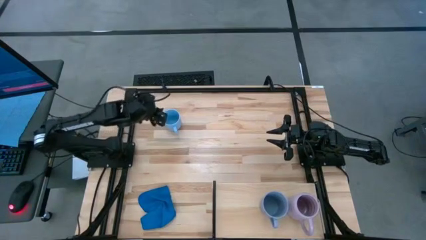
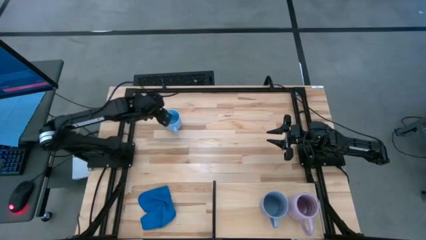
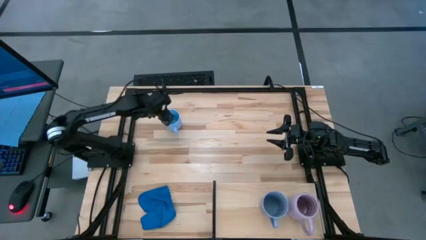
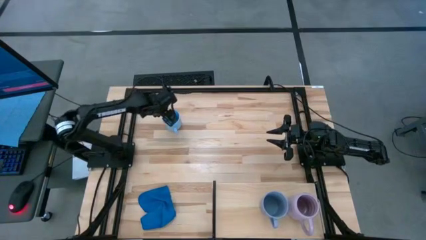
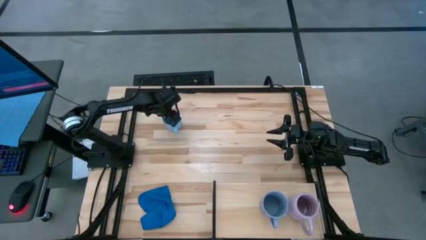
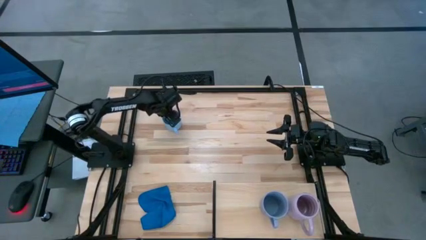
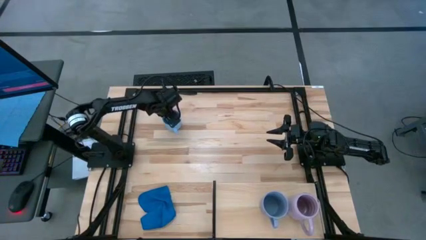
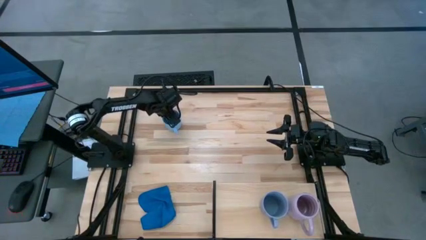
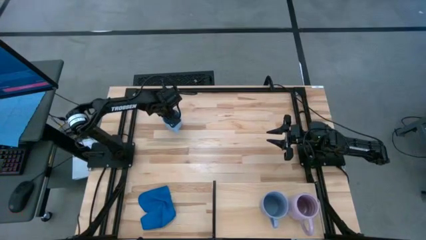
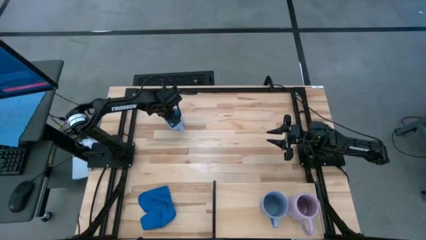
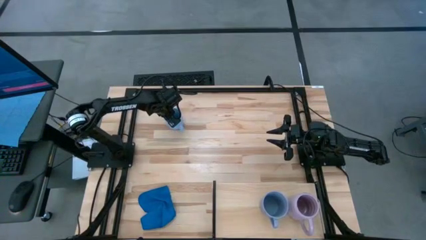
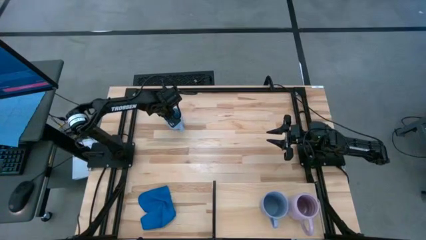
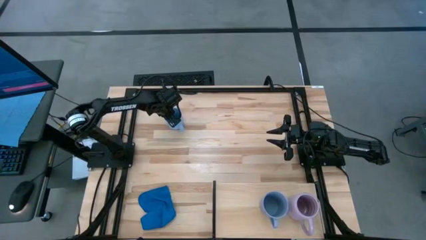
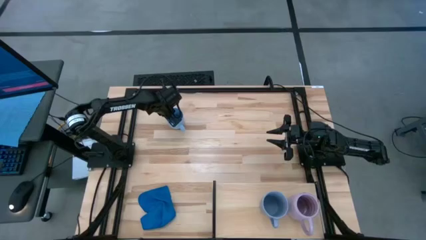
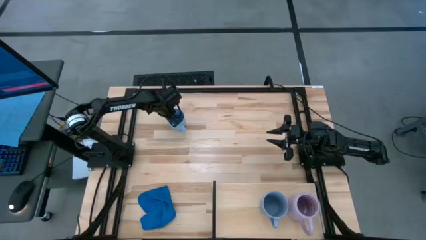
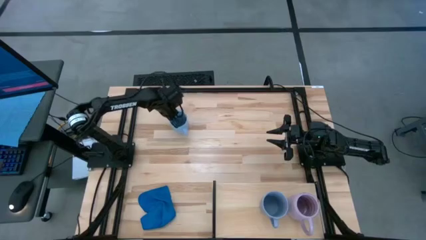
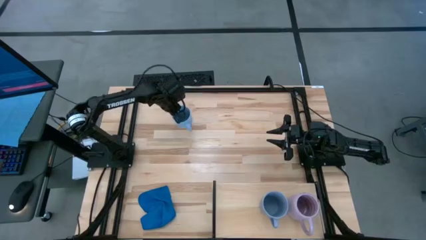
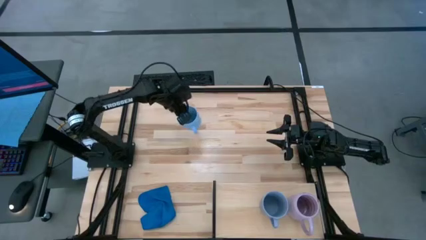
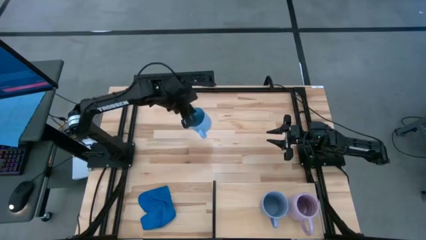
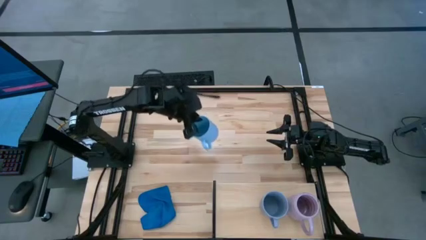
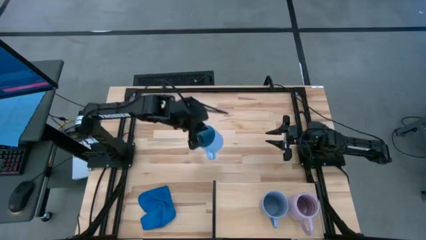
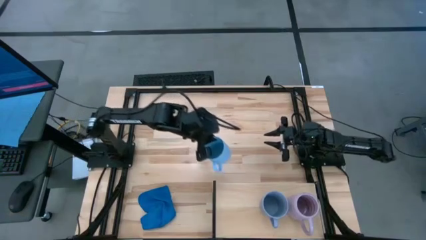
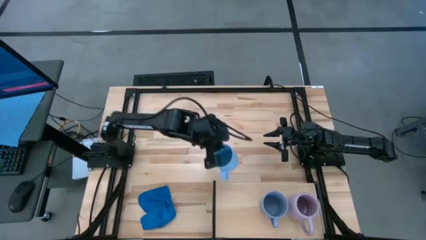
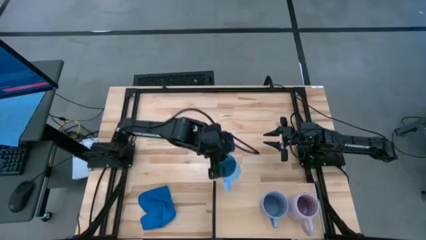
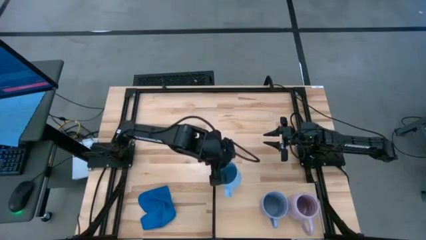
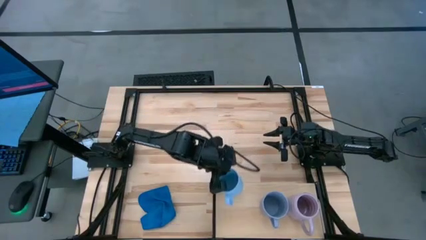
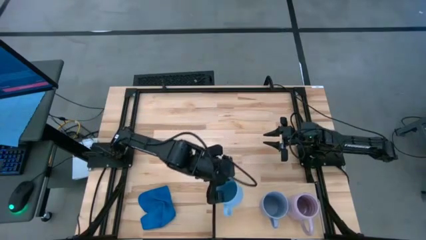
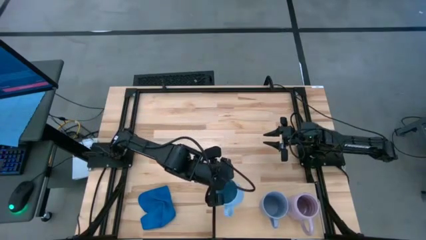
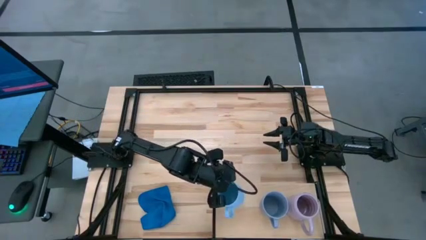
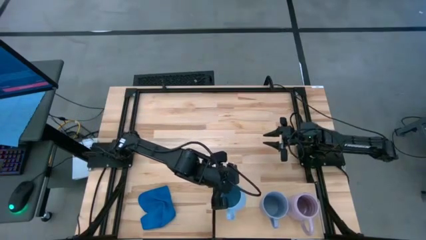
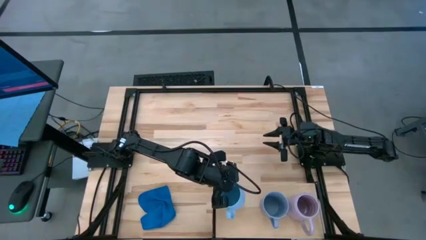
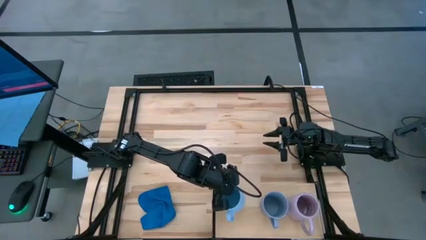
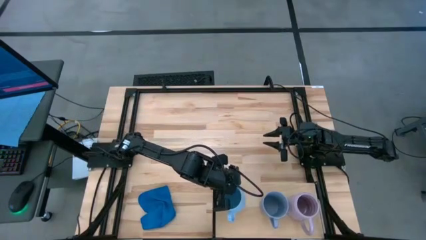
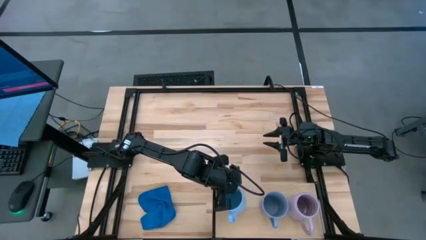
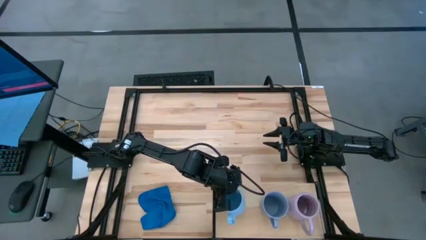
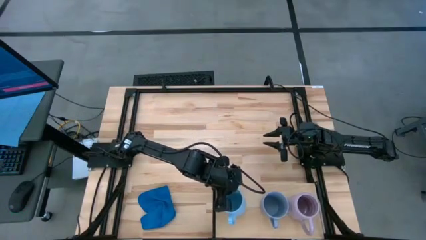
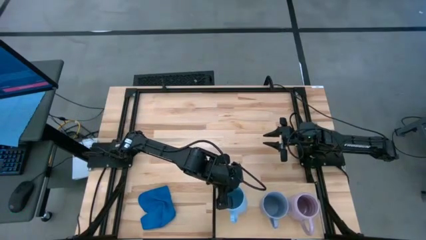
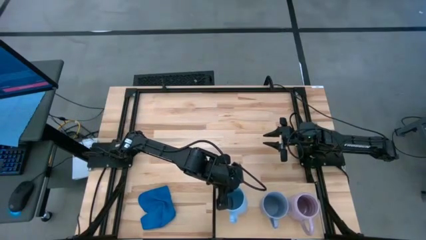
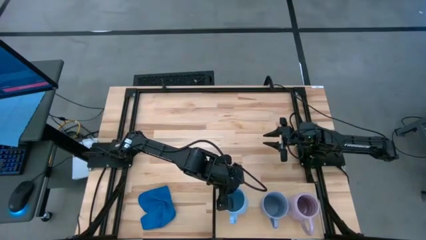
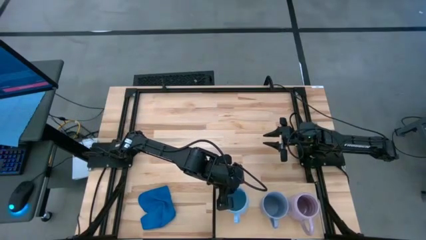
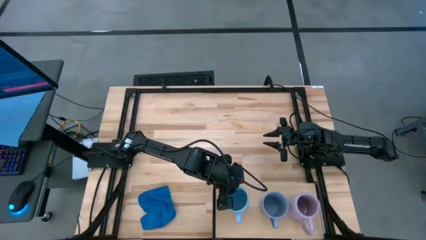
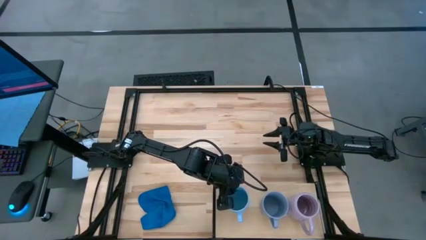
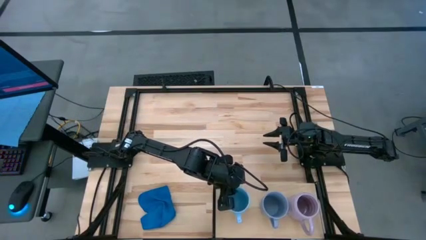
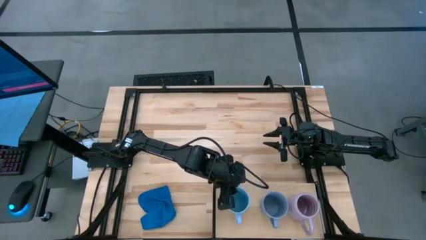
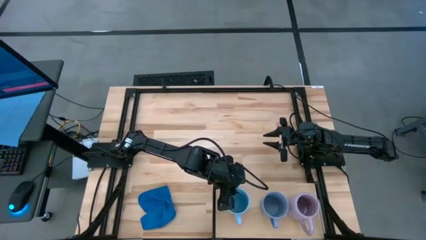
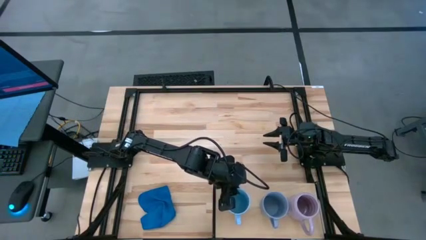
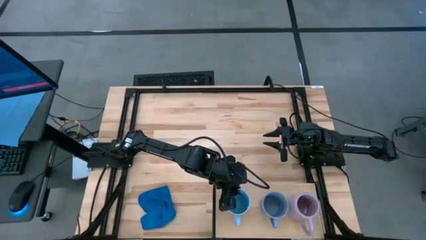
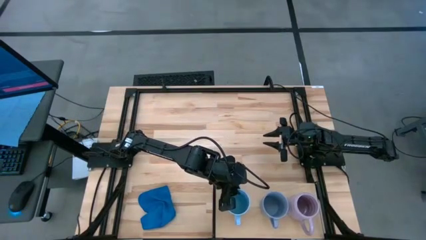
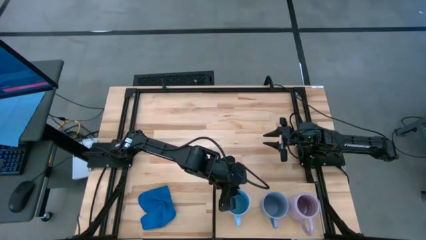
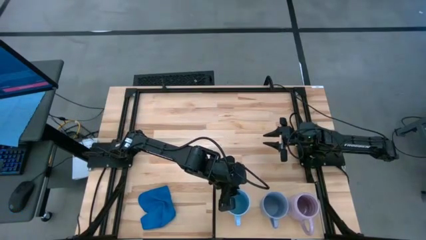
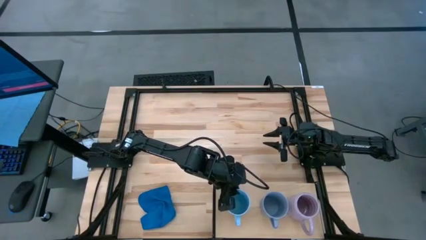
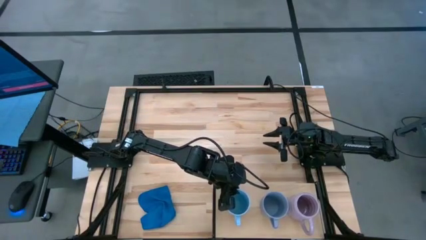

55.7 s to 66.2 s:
Task: Stack small to large cups/mugs on shelf
Put the light blue mug on the shelf
